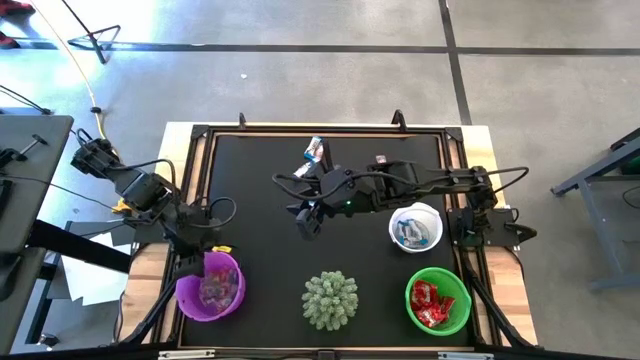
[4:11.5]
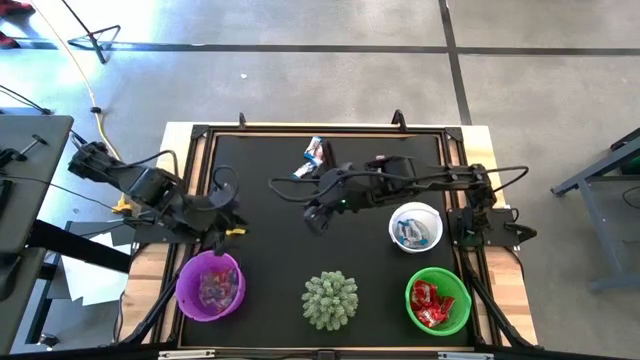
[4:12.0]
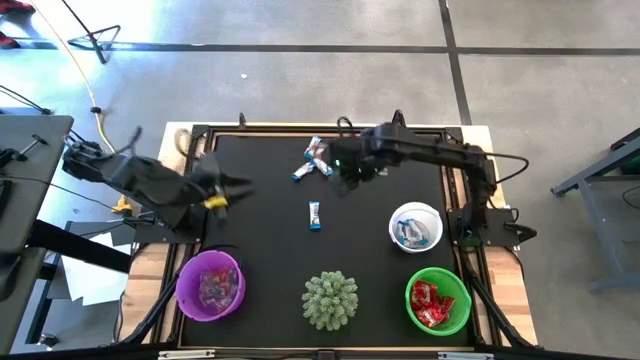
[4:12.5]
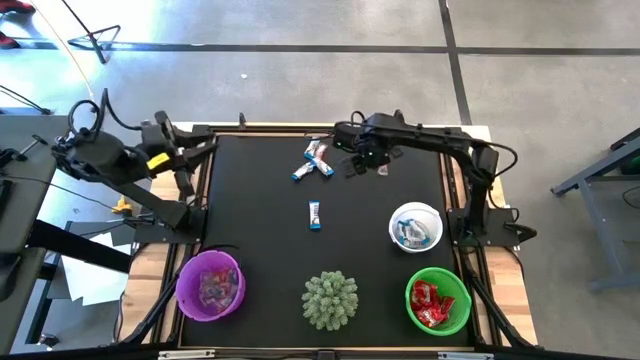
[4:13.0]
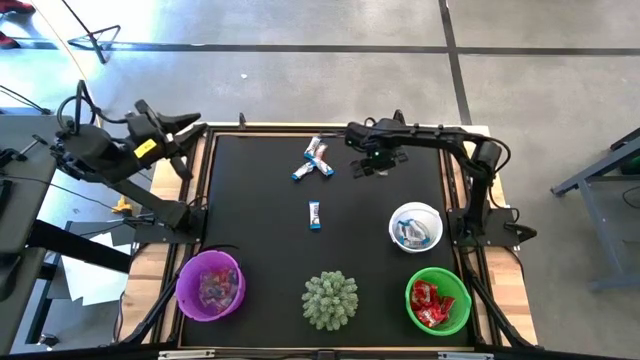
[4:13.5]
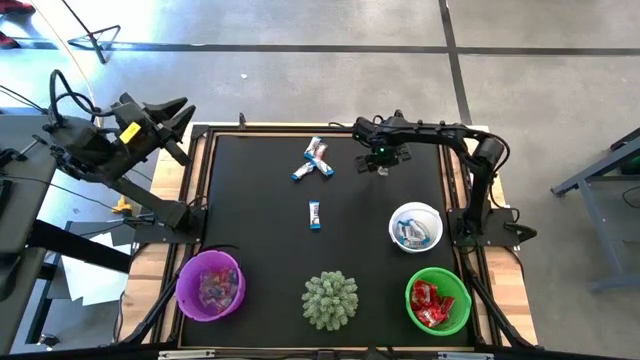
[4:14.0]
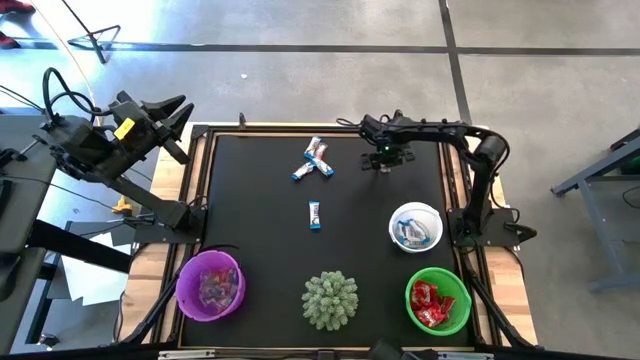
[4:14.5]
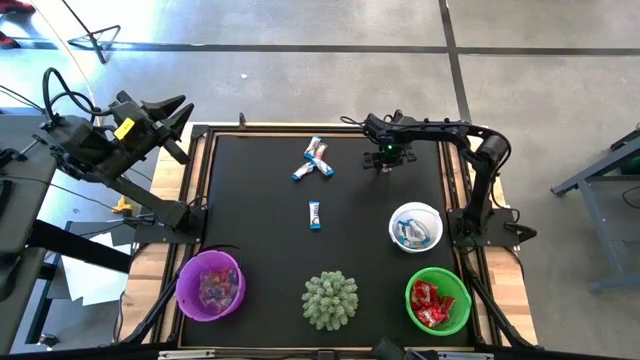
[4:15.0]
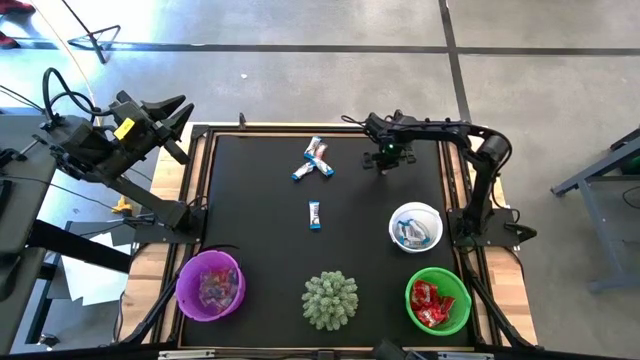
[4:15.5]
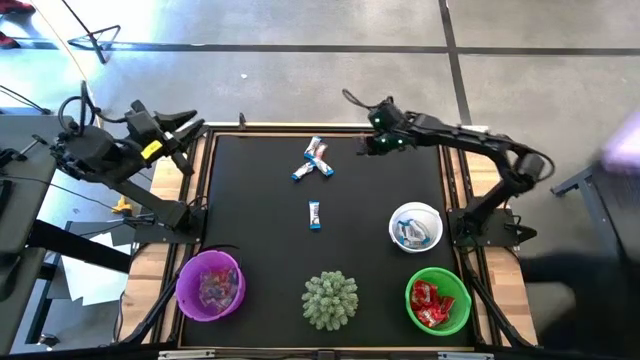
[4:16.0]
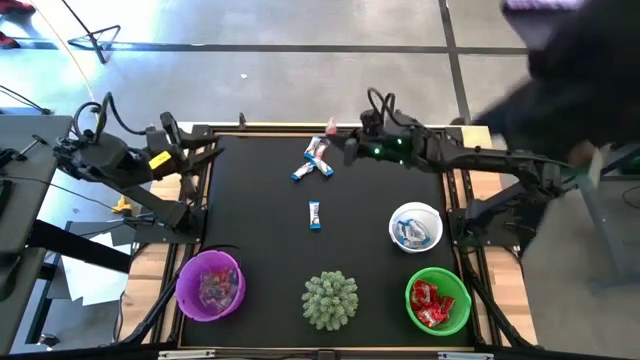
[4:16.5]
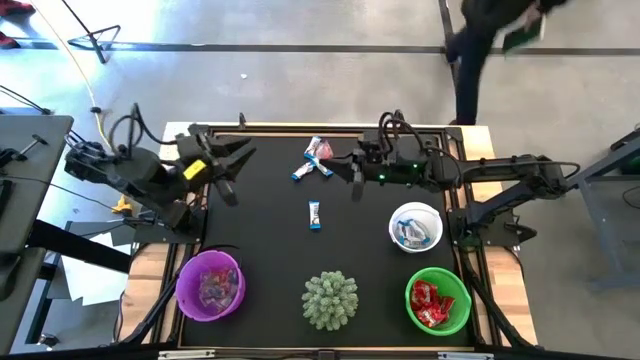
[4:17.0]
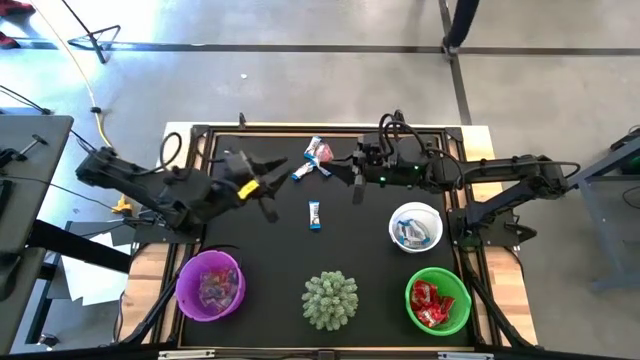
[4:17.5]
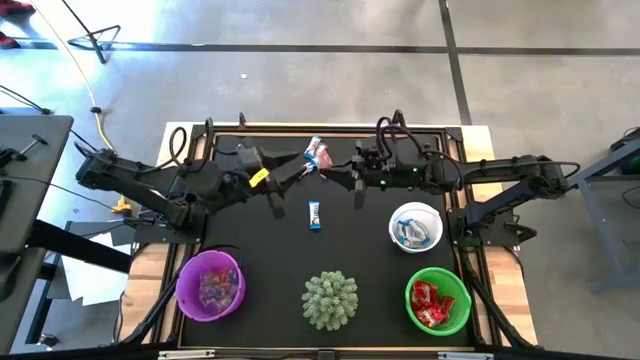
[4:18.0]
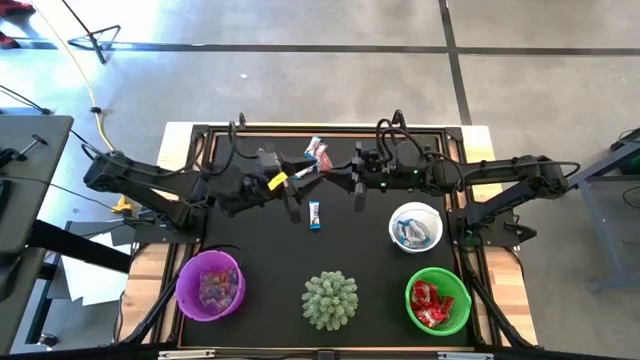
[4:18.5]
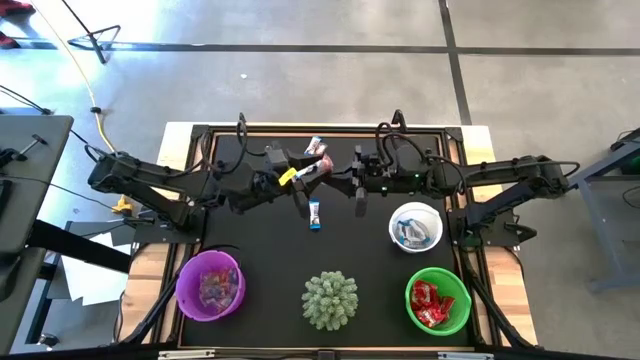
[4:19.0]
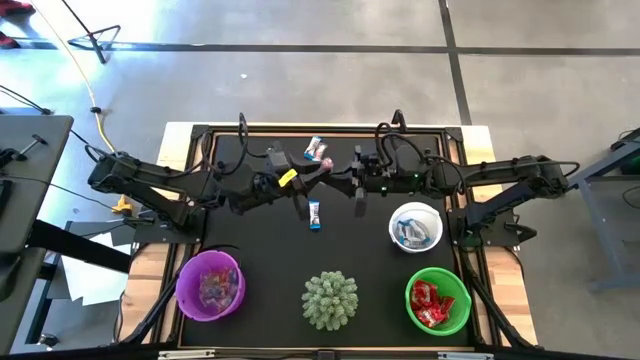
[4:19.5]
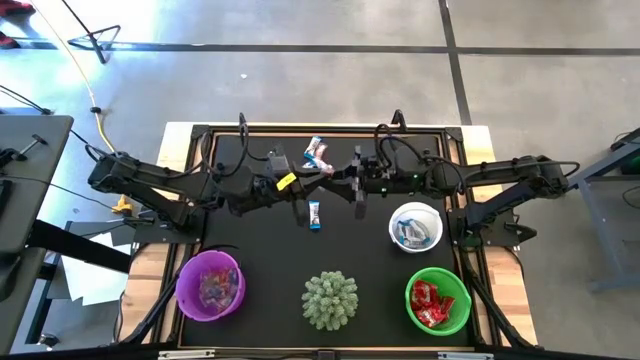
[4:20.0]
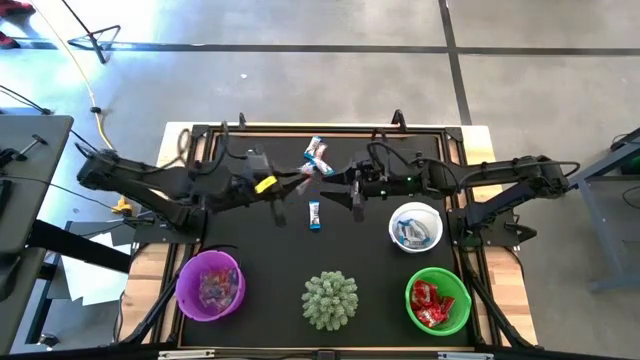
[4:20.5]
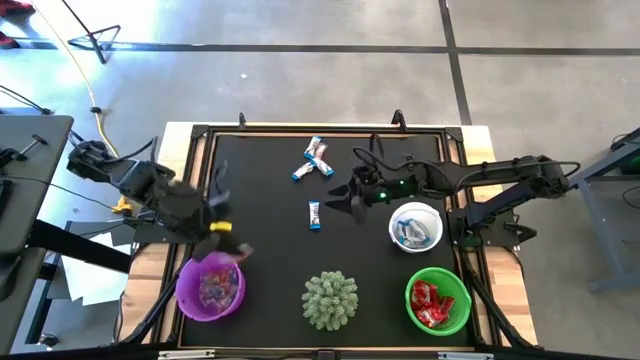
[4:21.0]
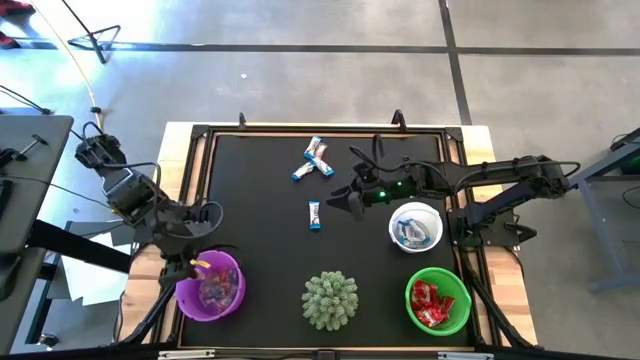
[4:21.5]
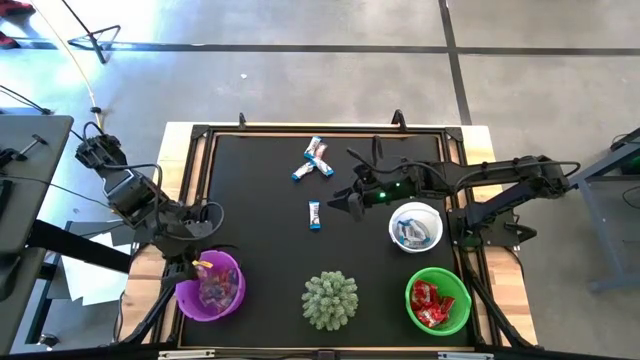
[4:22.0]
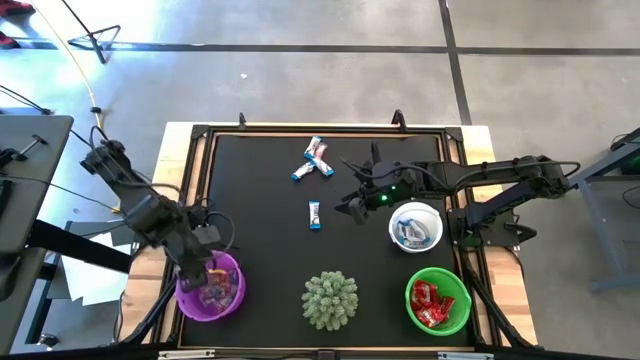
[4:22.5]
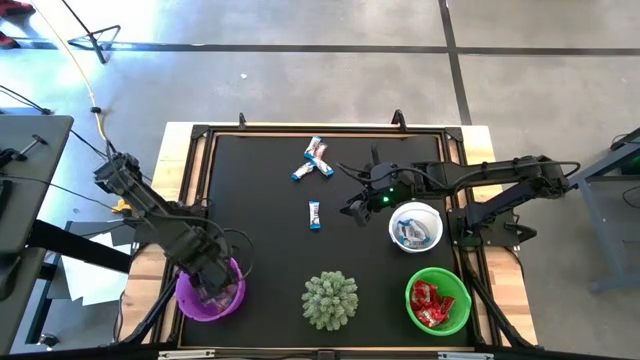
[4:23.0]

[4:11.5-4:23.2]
Task: Sort candy
Put the transparent candy wrapper into the purple bucket

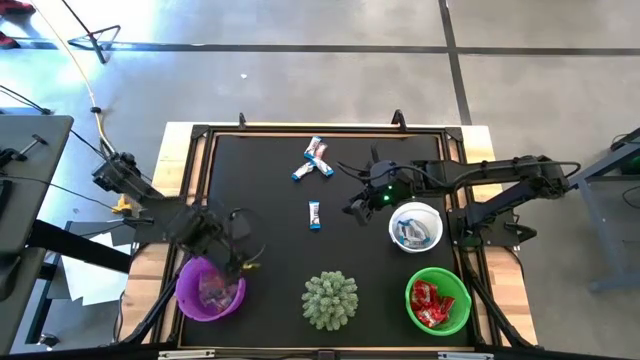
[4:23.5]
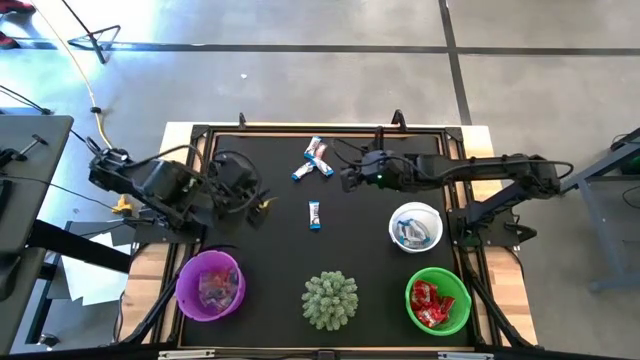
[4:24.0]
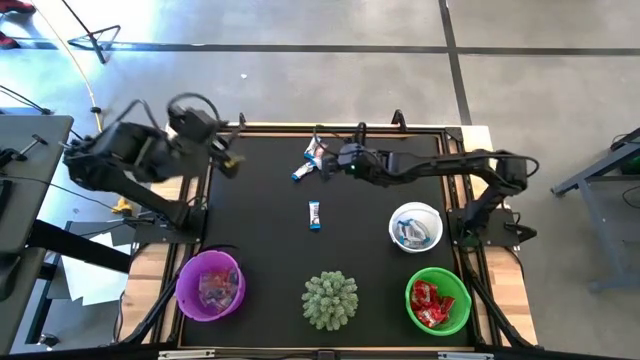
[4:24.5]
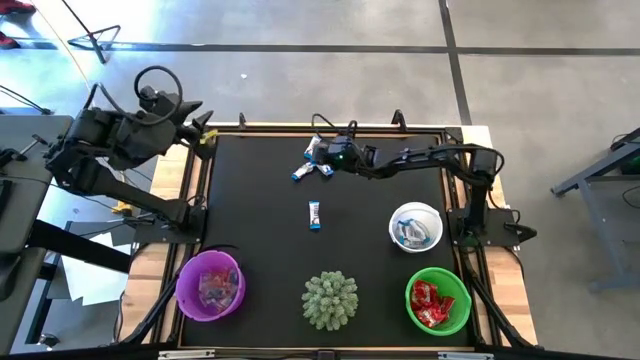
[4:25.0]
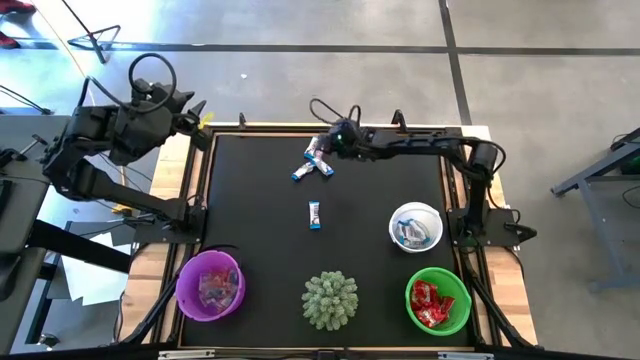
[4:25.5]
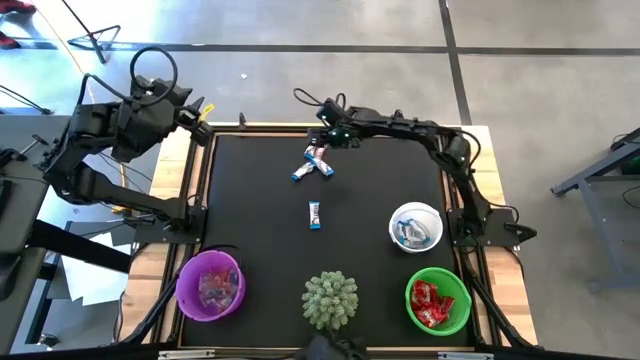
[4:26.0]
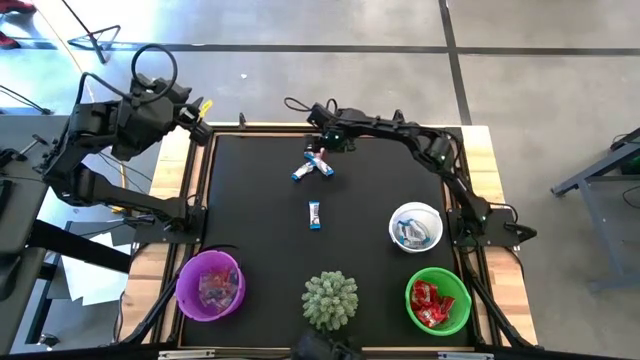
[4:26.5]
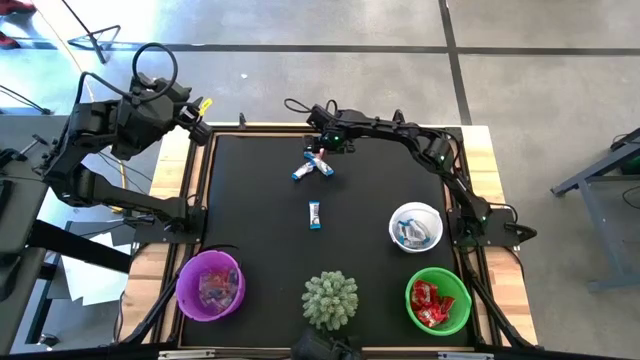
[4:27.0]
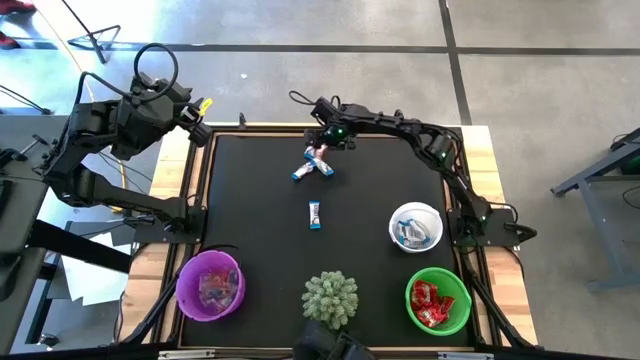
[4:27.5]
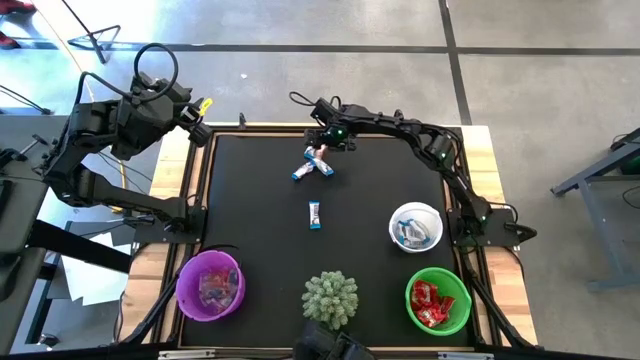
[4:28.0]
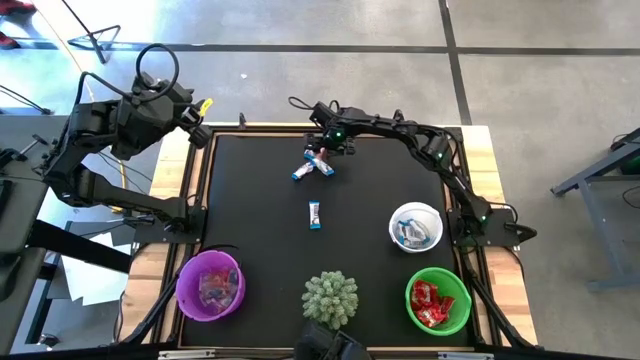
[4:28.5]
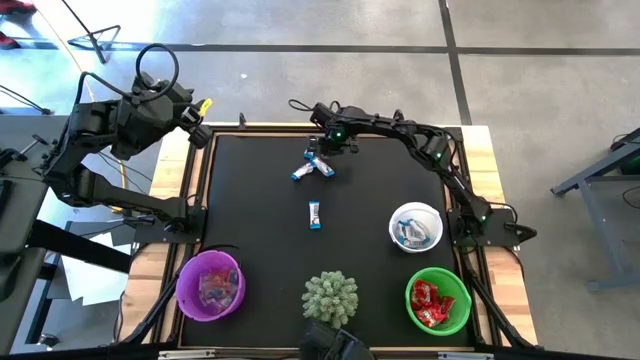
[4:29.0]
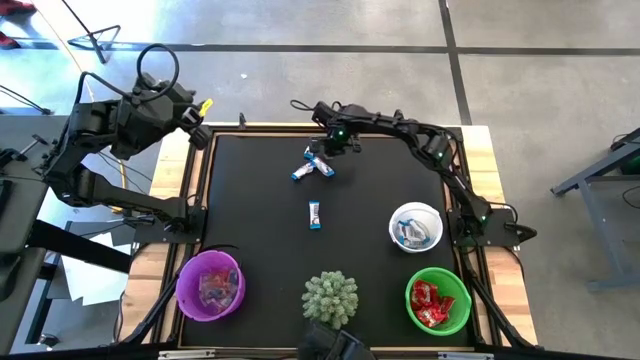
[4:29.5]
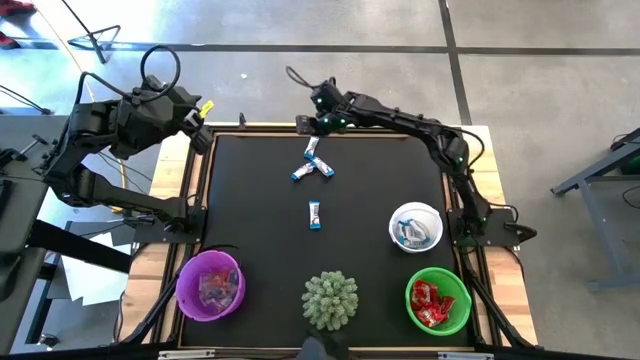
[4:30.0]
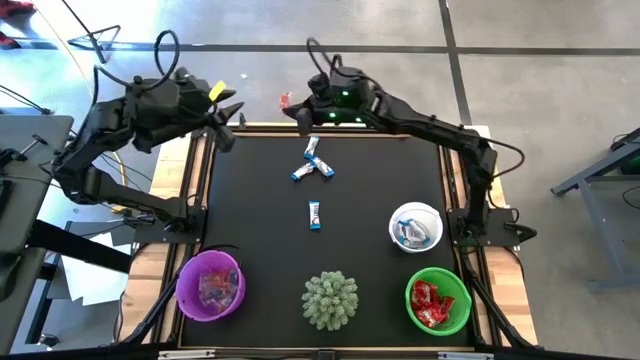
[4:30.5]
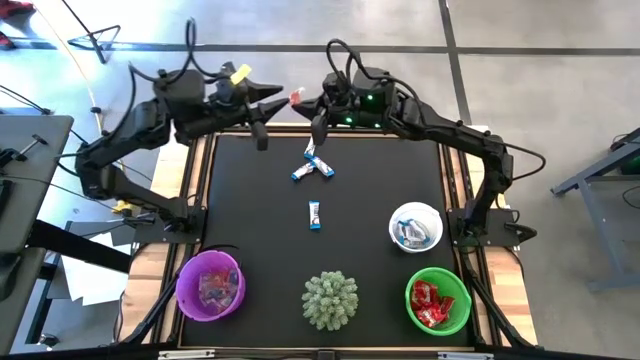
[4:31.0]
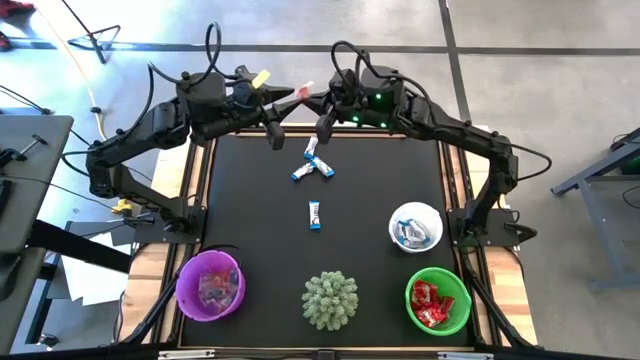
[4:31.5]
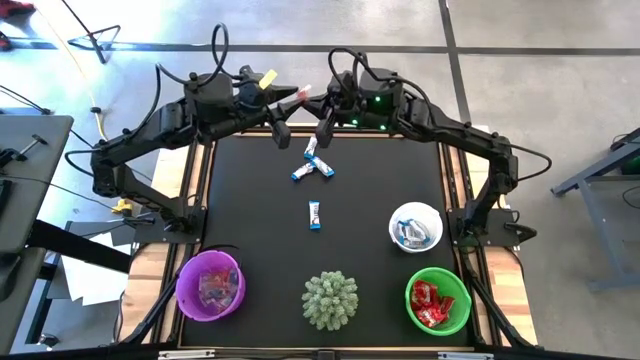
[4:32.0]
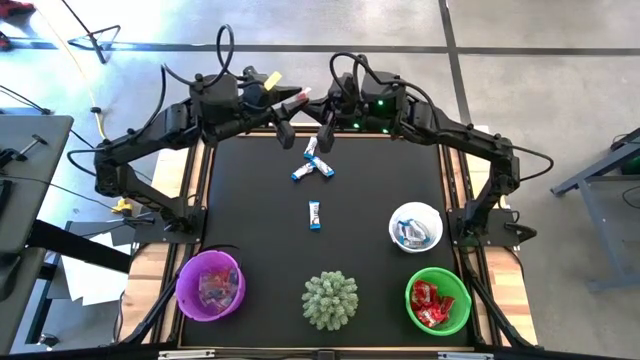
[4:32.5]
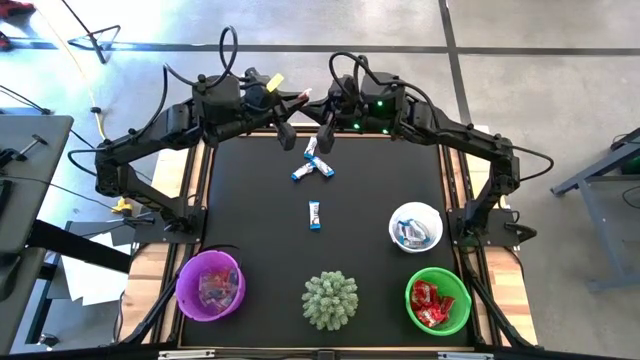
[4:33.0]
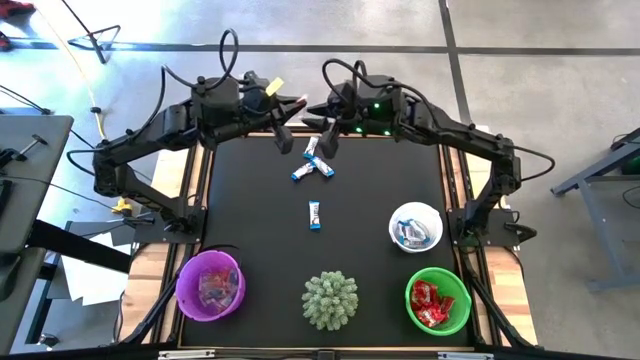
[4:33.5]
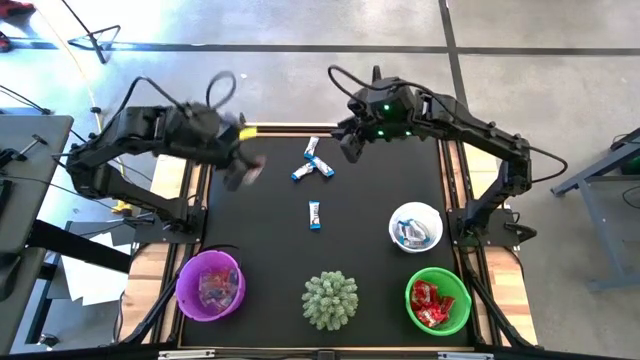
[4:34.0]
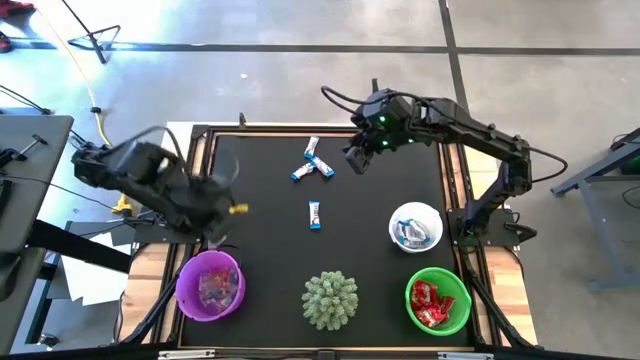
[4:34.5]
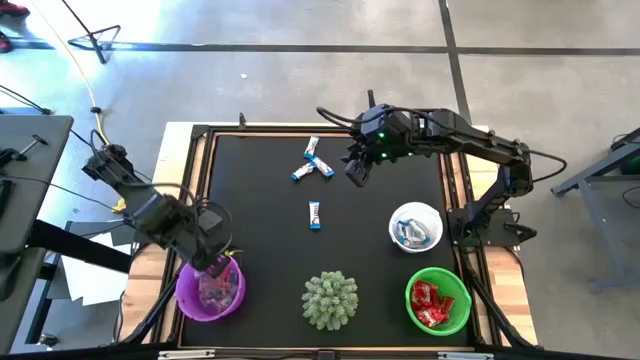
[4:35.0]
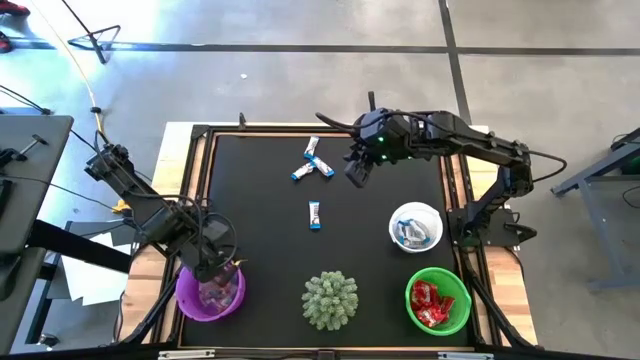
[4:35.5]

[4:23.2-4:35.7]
Put the transparent candy wrapper into the purple bucket
